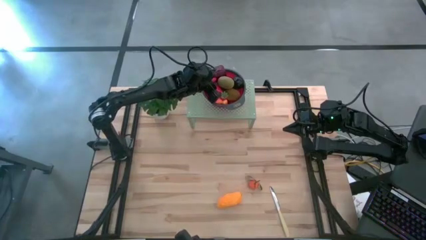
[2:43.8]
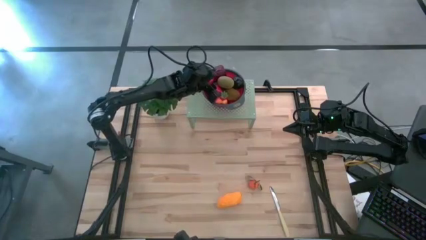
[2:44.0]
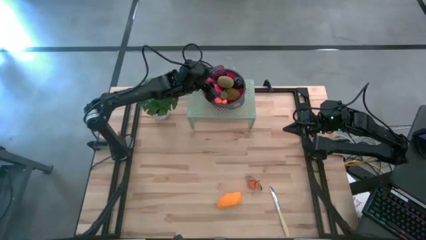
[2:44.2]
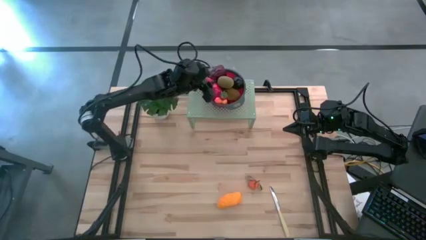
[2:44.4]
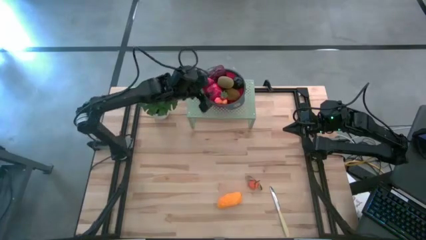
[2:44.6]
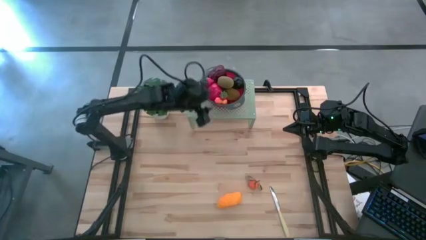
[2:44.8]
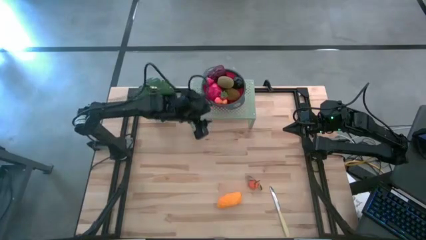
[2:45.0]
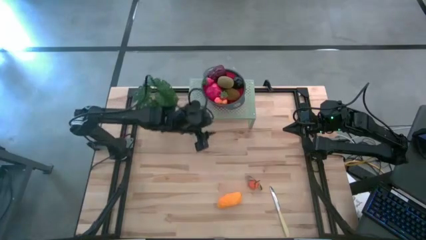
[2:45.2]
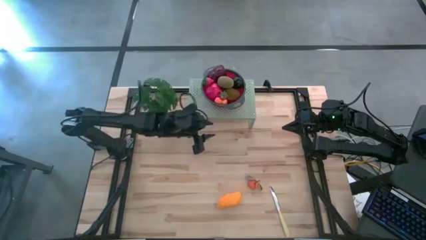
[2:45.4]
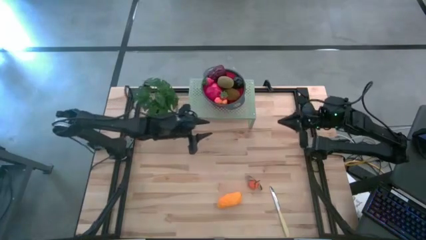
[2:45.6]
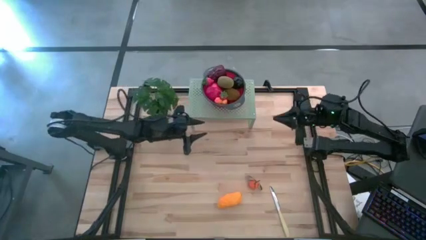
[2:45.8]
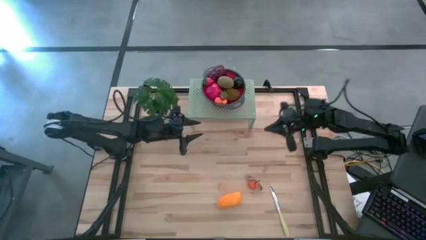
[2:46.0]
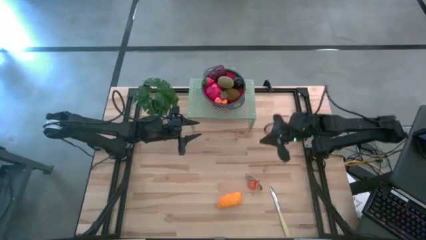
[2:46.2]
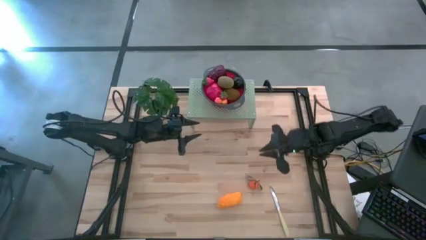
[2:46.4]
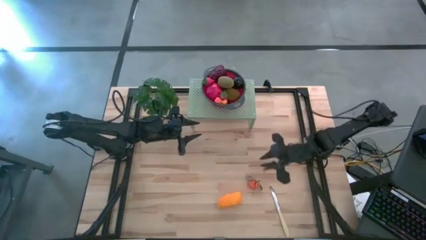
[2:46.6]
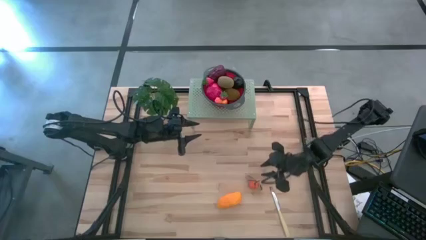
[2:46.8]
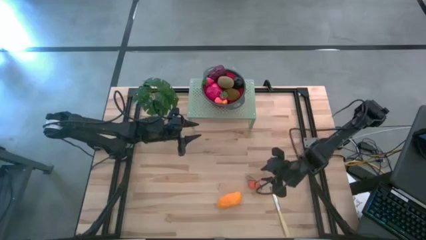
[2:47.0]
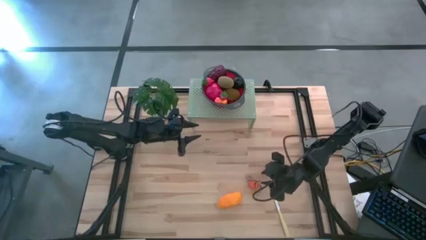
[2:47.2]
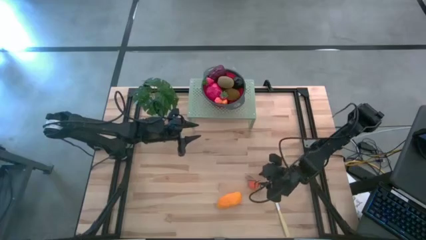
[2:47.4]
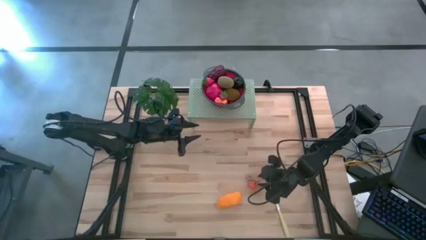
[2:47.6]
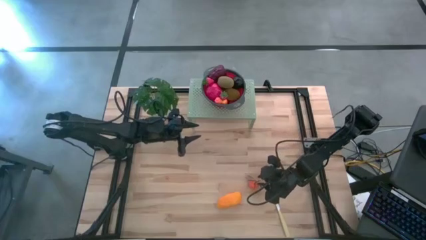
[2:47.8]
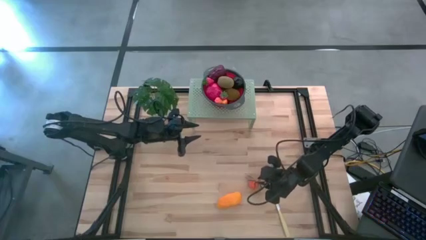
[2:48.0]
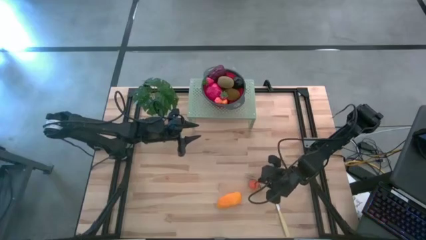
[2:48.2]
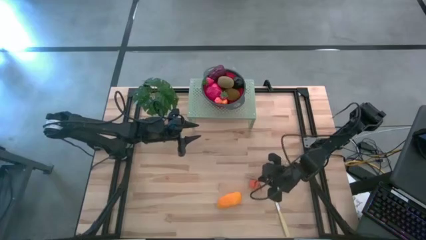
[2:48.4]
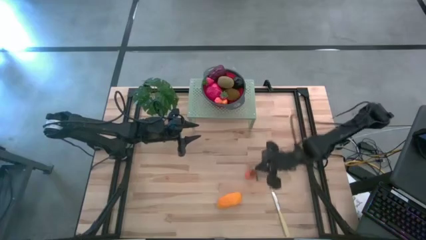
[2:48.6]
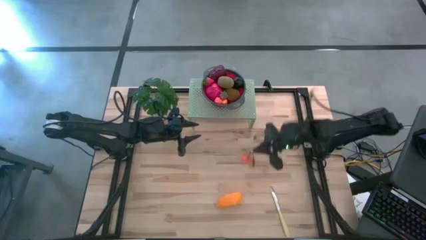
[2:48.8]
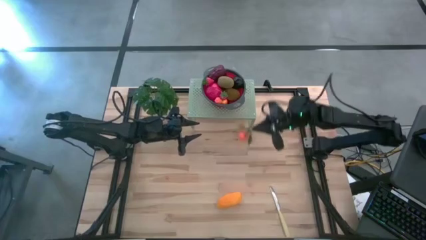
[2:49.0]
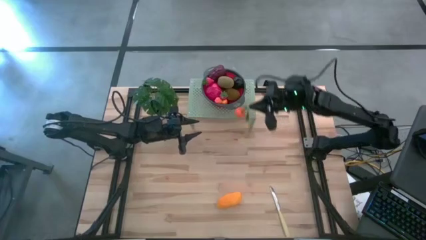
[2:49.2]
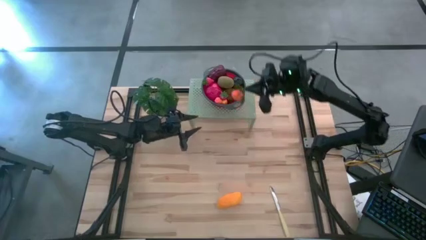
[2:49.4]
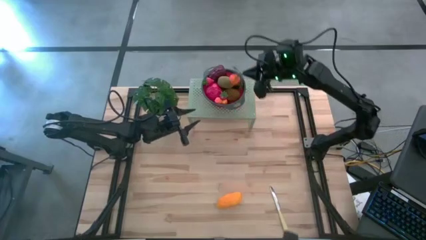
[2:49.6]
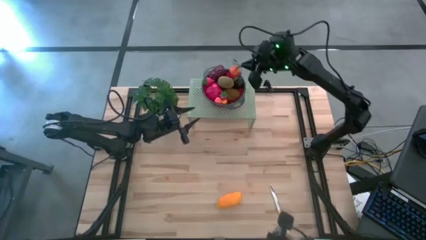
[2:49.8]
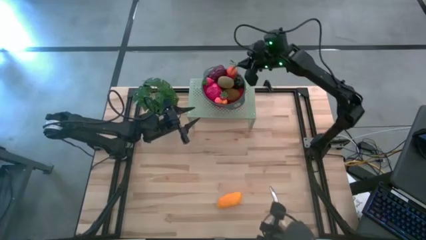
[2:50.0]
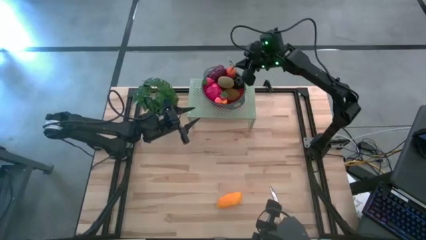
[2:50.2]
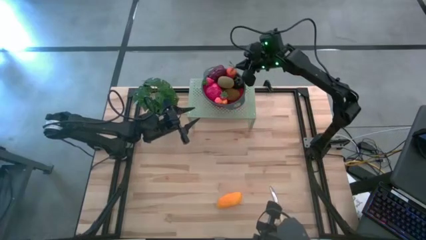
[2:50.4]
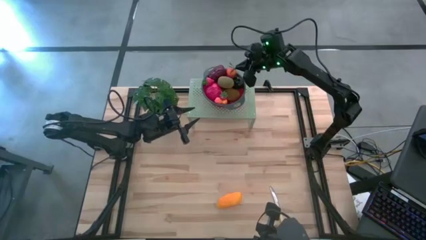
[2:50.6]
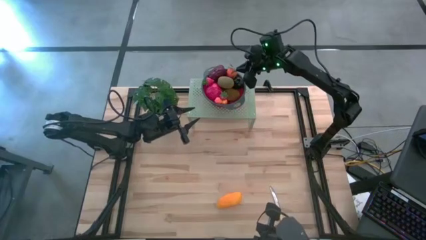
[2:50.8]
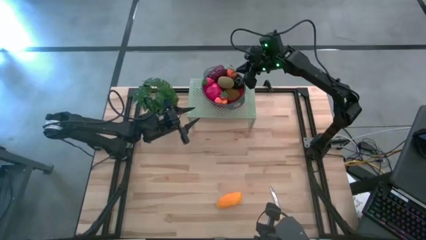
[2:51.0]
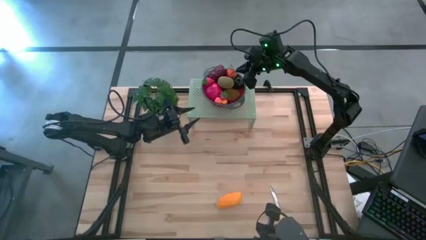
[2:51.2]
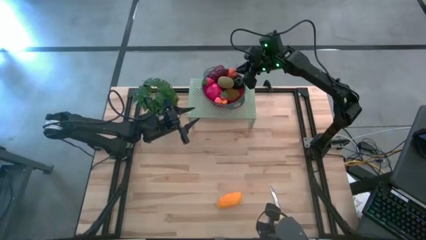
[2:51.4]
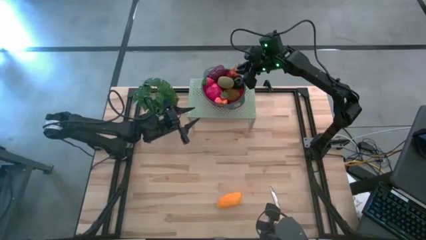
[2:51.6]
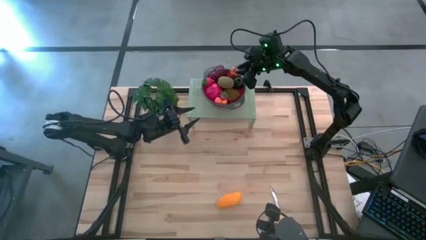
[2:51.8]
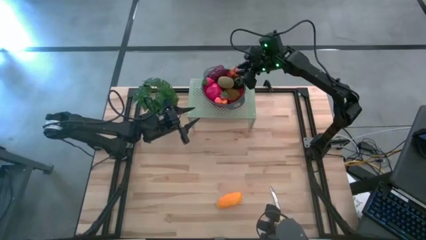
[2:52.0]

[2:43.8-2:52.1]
Task: Pick & Place Fruit
Put the tangerine into the red strainer bowl on the shelf

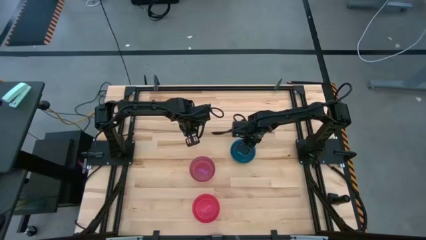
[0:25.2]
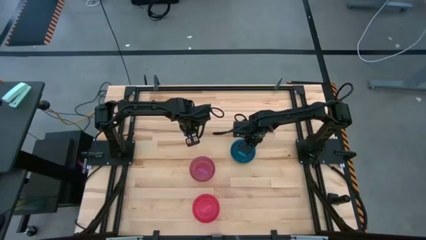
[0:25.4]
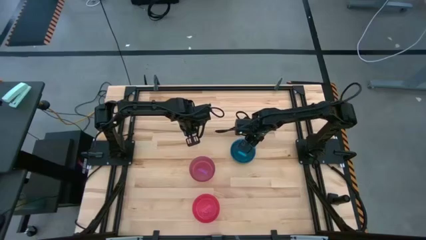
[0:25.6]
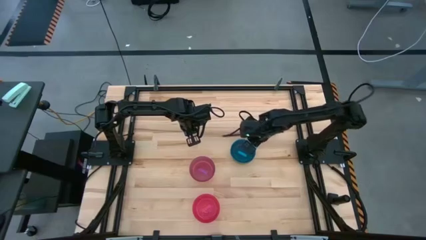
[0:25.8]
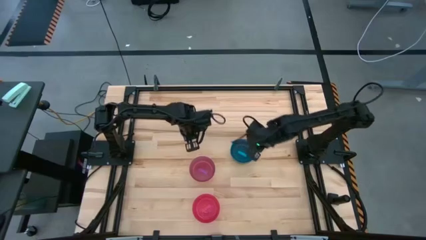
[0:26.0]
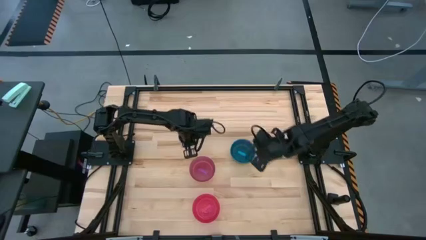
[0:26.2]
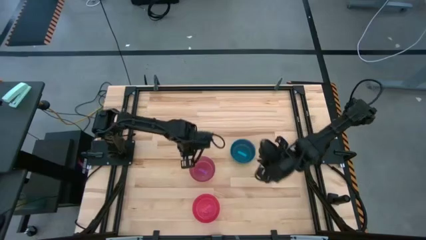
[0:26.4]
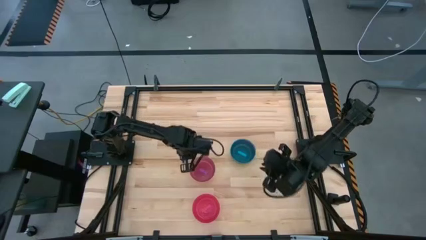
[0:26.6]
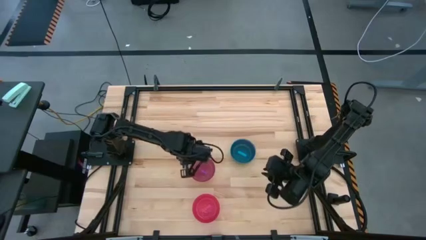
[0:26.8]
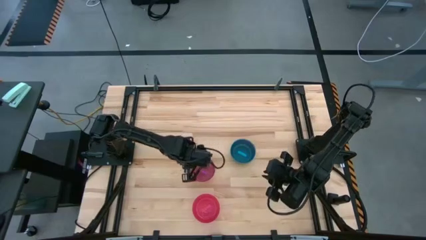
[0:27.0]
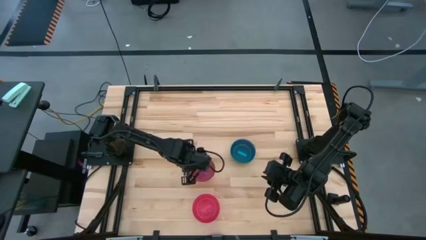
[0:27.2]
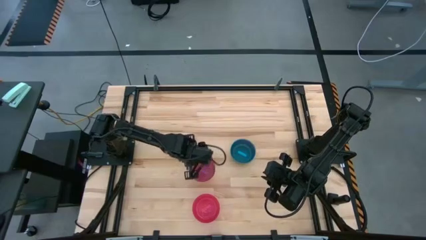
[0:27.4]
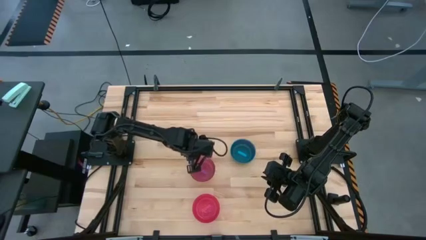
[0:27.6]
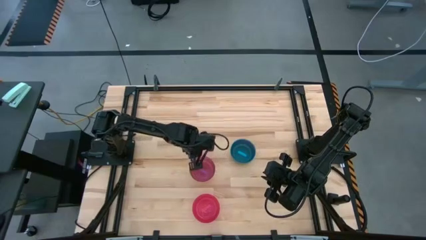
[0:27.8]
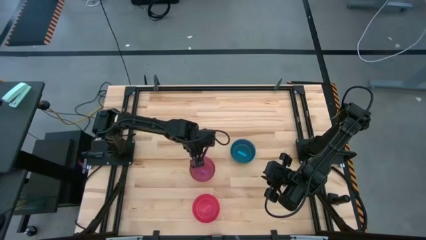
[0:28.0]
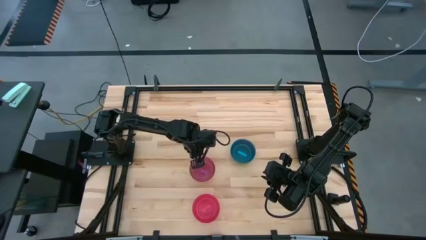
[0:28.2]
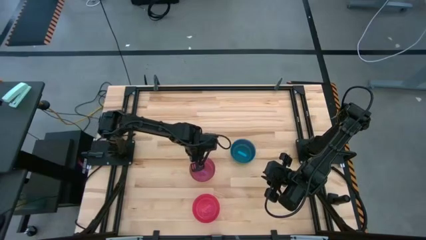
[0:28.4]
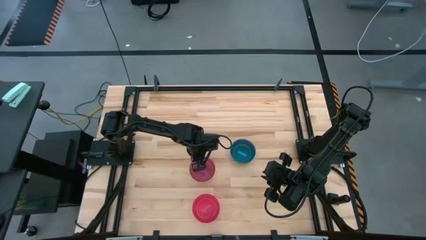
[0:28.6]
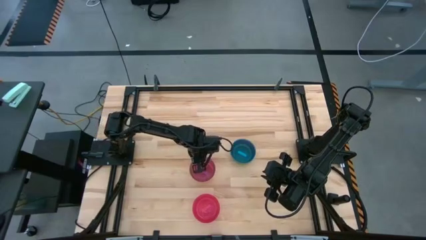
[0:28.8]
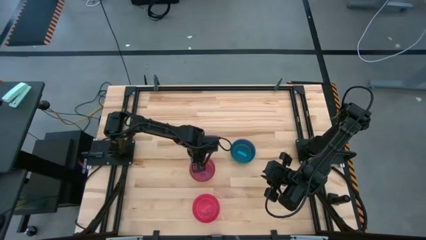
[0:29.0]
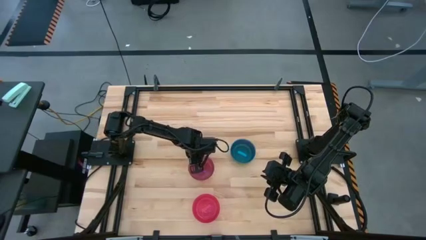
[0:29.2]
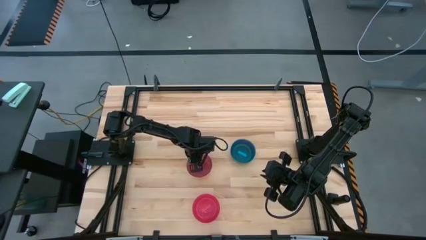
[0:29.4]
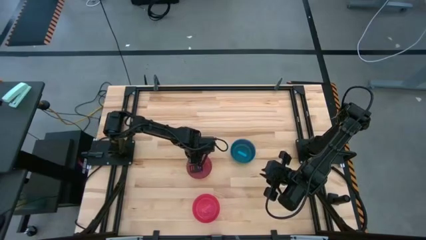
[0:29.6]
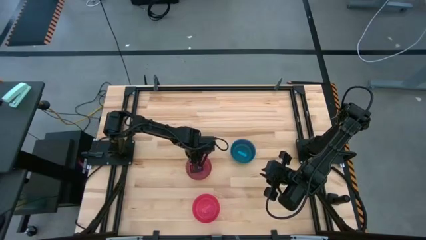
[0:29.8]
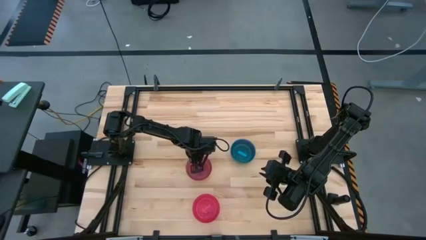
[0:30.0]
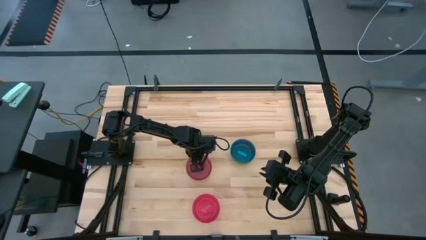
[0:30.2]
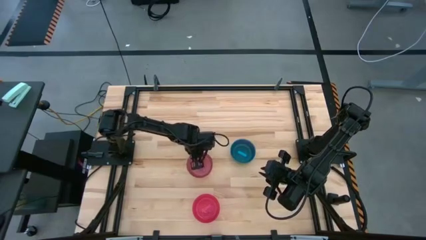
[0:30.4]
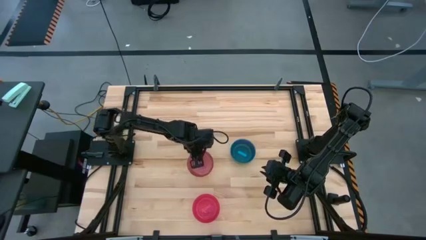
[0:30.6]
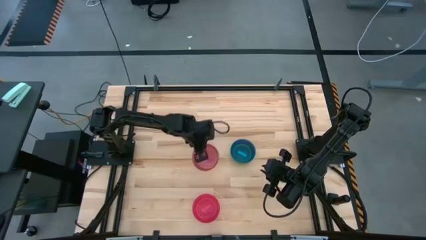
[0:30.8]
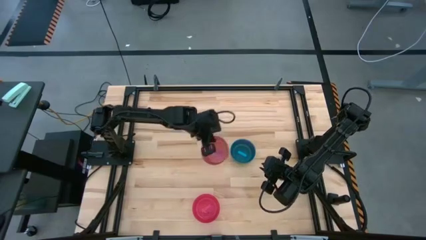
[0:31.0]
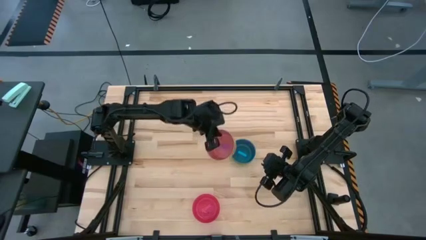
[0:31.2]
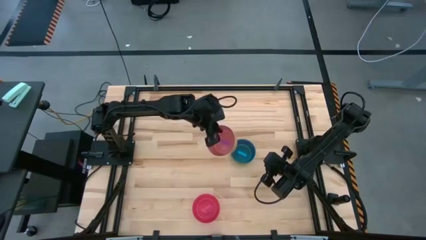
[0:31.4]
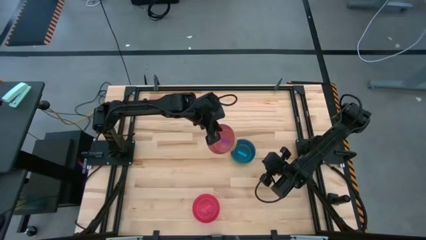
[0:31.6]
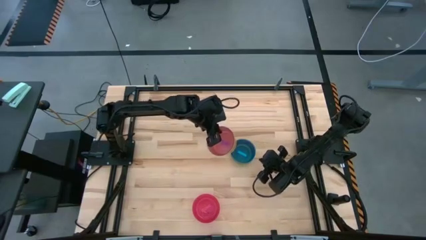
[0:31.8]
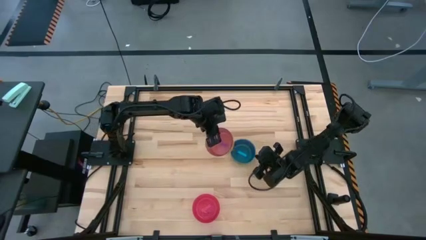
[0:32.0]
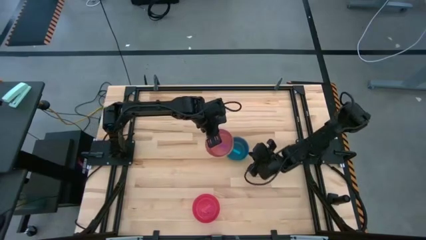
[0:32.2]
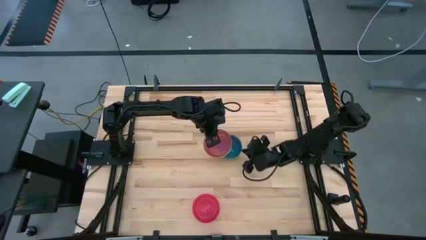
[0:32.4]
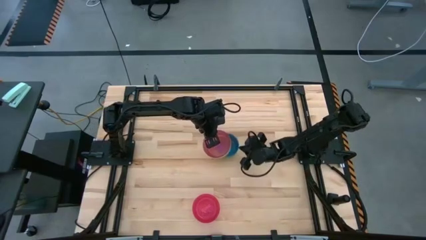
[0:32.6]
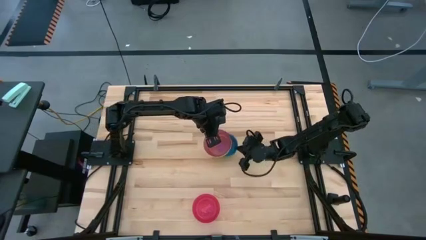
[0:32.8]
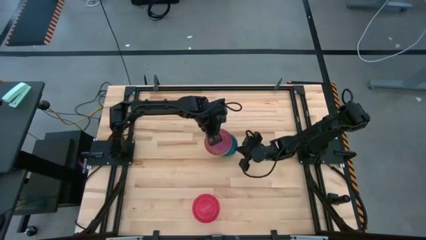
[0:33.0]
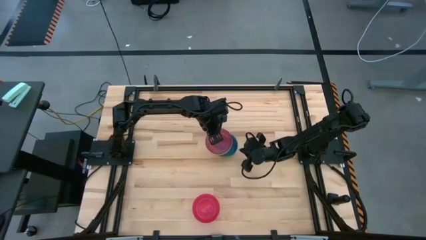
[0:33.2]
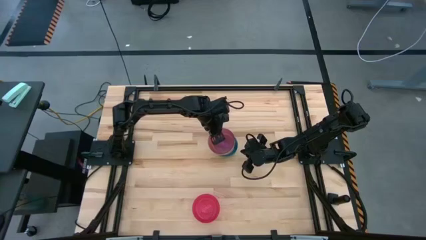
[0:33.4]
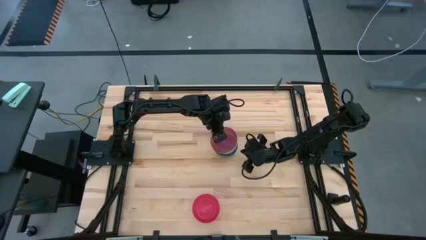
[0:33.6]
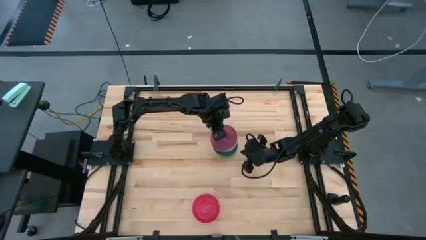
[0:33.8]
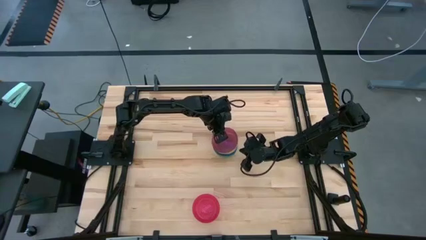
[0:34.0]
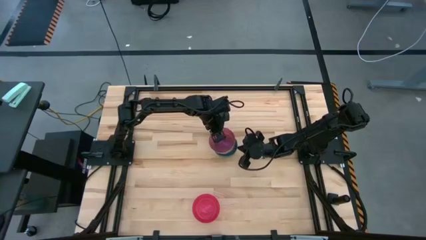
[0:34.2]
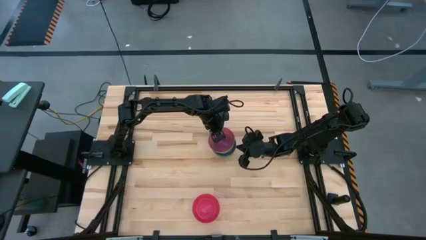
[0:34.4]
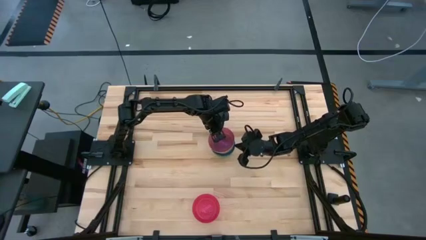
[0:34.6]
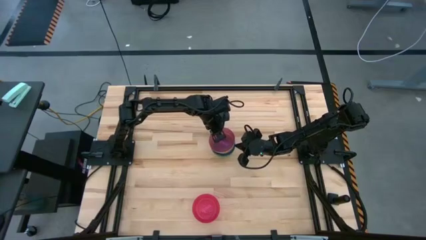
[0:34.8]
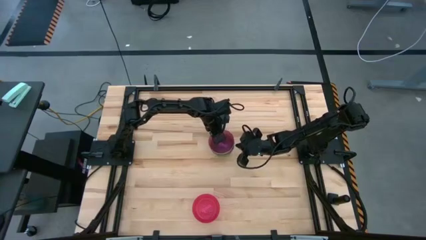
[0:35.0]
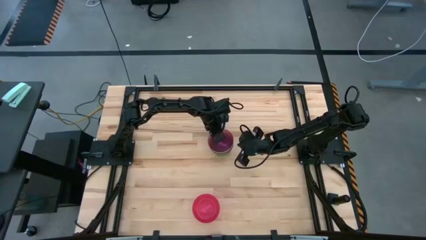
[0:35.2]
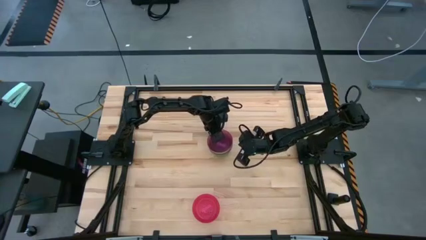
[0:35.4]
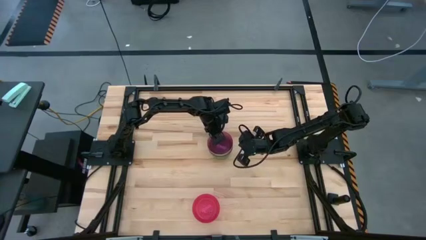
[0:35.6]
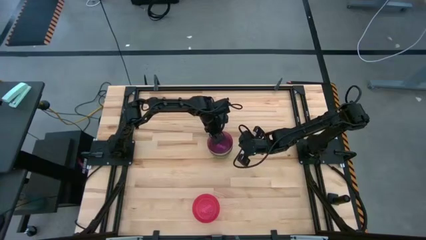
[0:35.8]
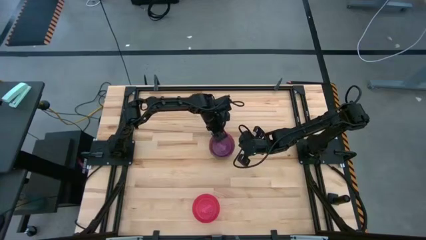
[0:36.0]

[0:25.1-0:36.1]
Task: Nest bowls inside each other
Stack the stacked bowls on top of the blue bowl
